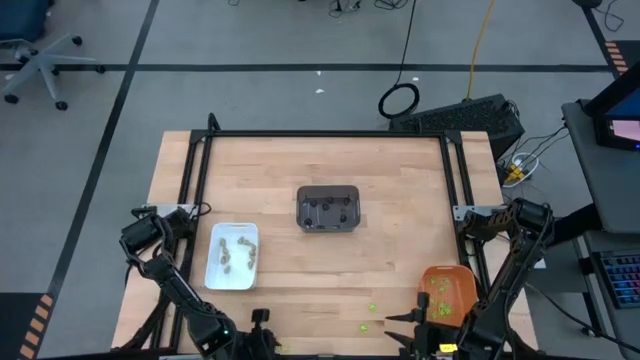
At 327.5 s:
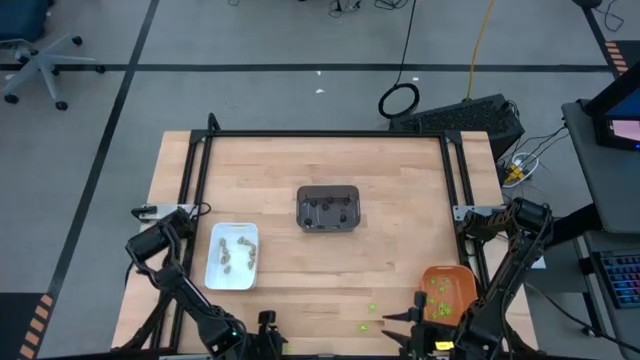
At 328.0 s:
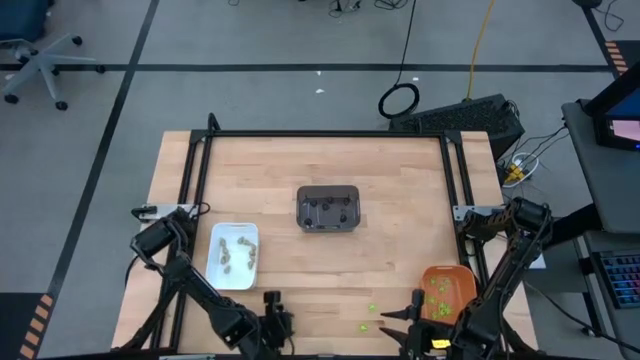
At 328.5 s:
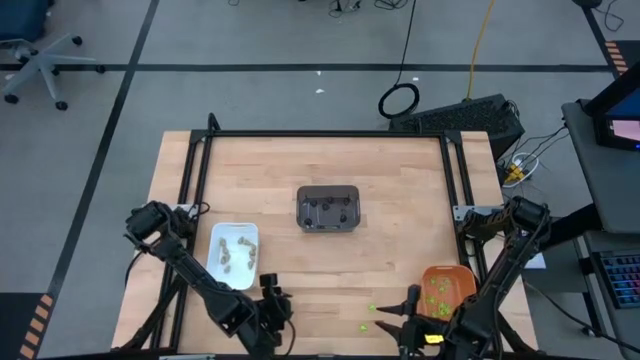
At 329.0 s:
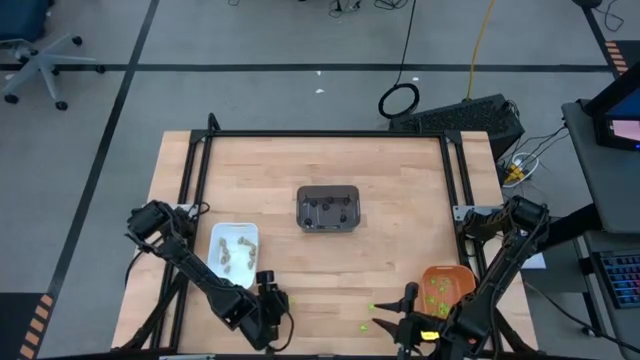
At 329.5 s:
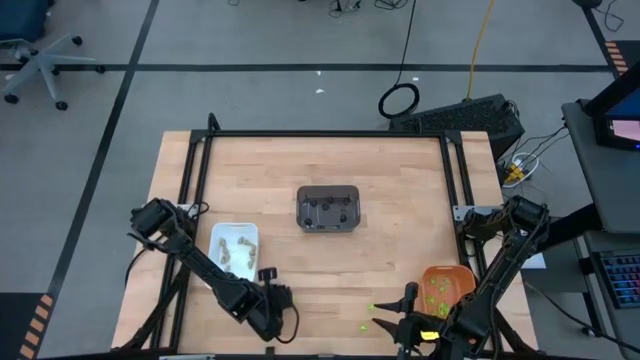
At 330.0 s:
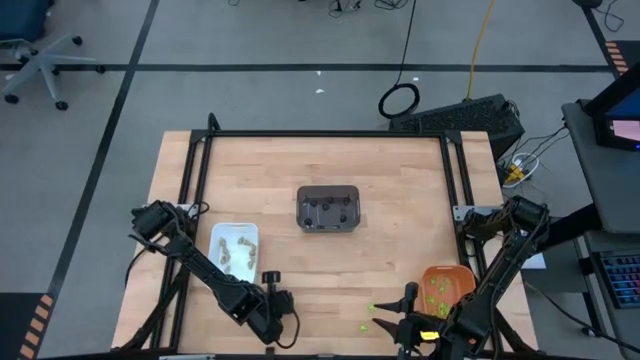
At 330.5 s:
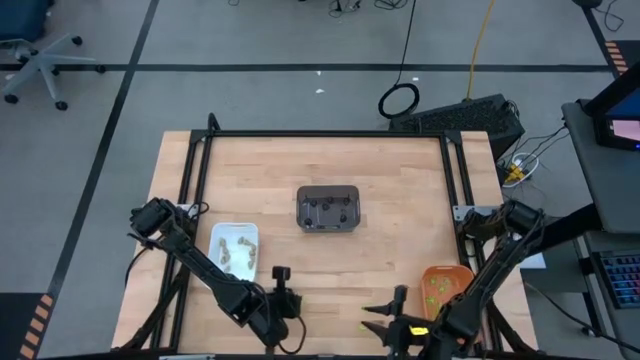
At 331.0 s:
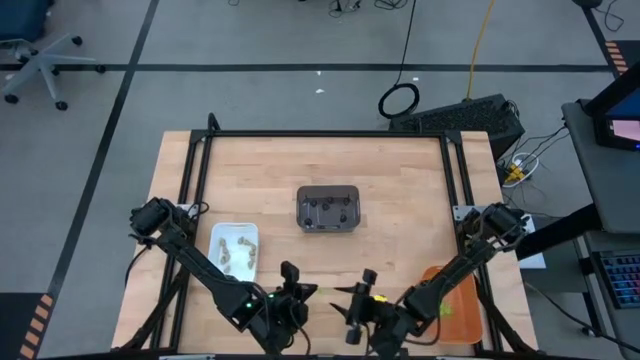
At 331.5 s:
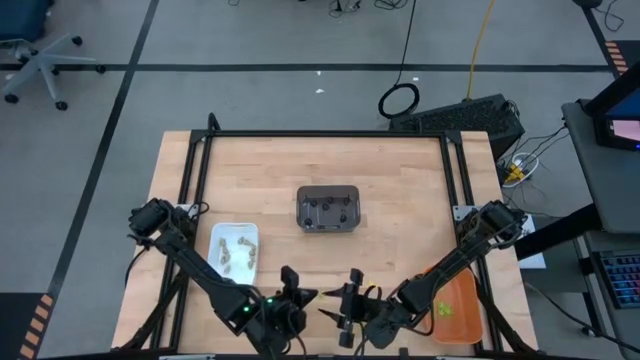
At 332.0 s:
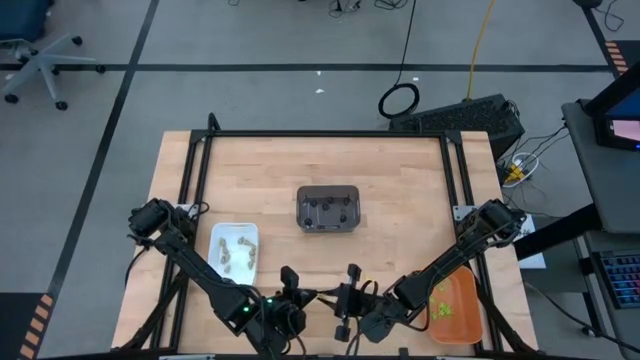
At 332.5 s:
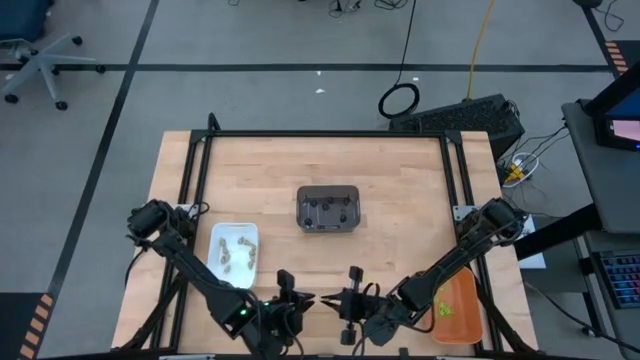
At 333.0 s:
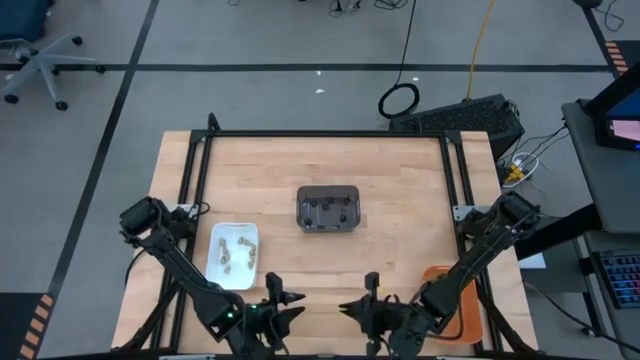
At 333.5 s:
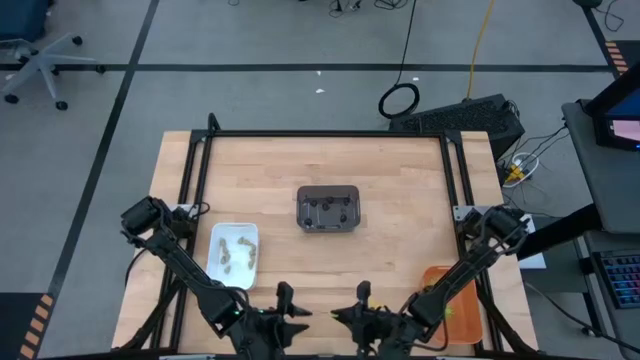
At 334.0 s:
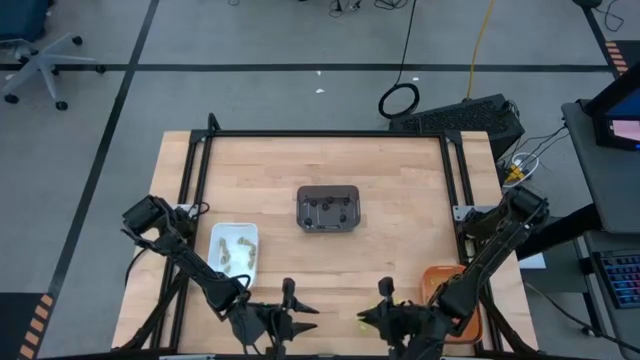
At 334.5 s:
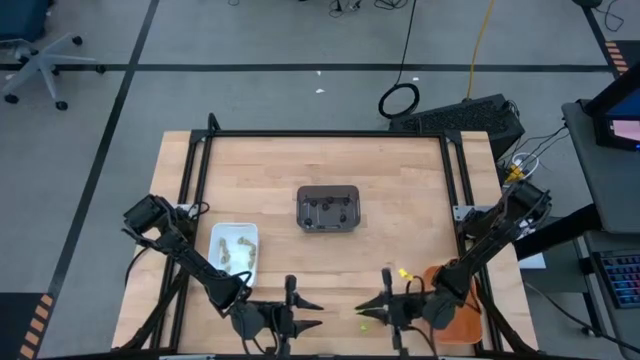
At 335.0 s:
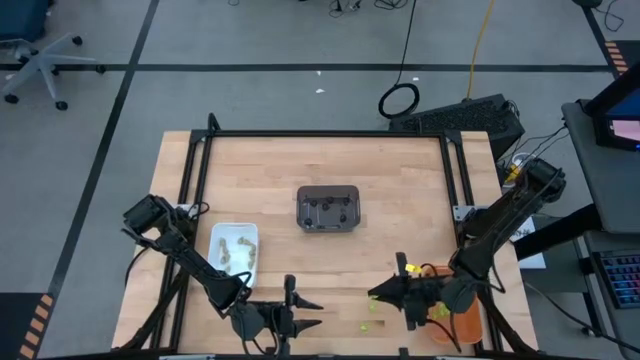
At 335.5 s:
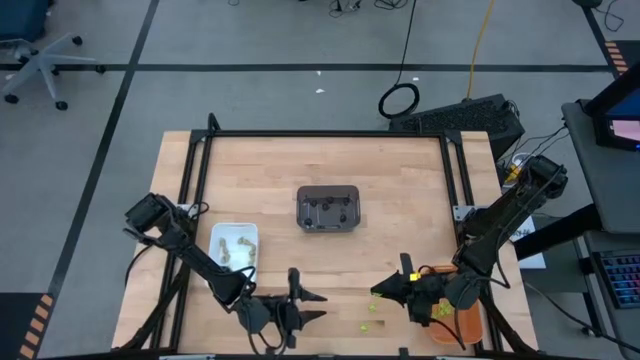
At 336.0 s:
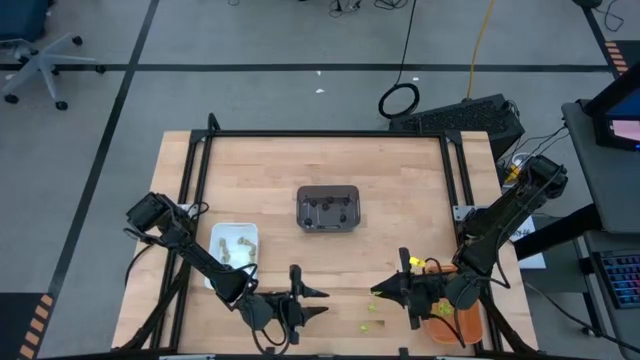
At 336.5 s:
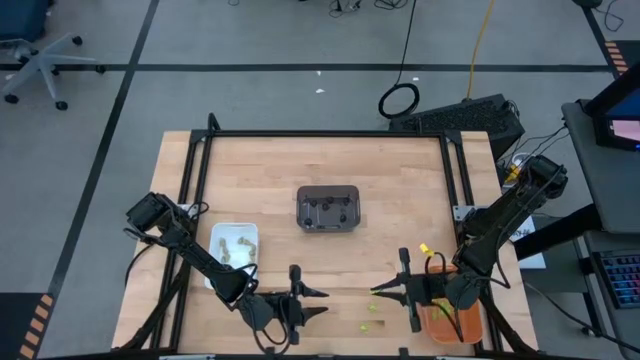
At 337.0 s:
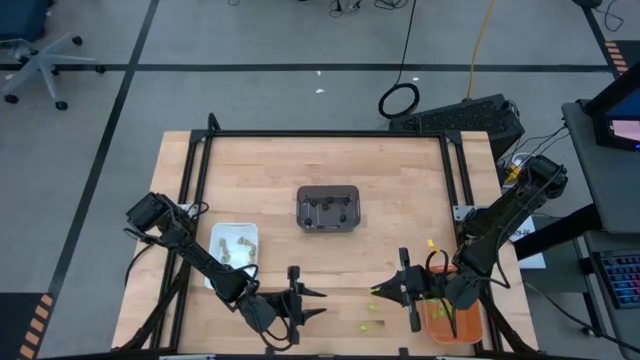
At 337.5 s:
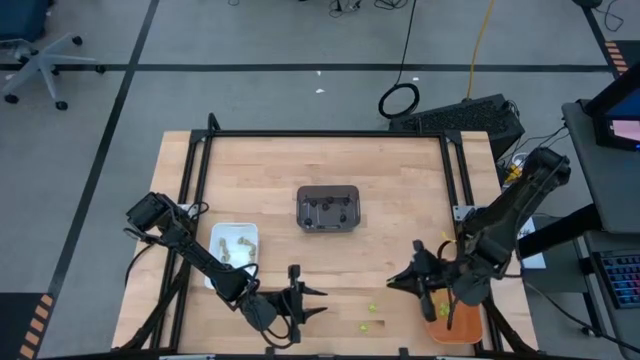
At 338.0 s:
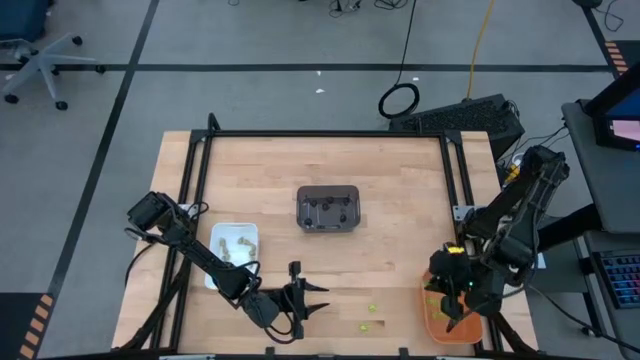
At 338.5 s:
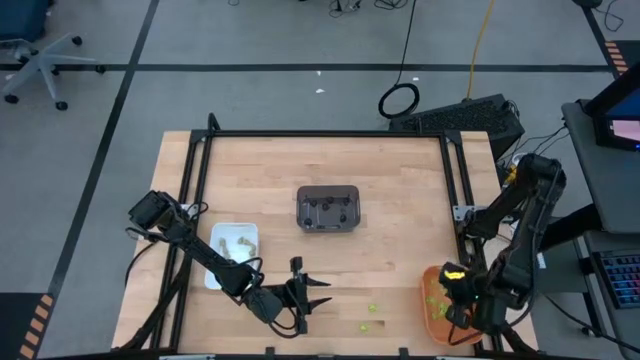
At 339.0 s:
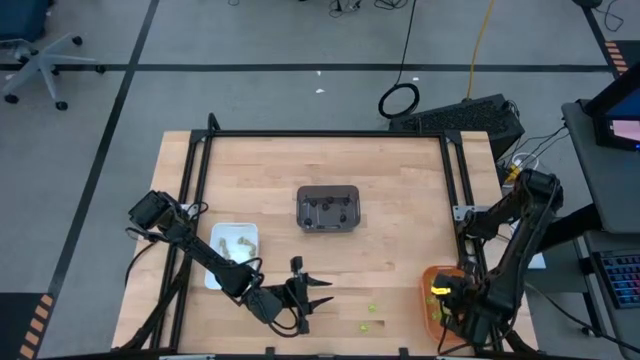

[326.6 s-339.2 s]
Task: Sort Halloween decoration
Put the green spider toy into the orange bin

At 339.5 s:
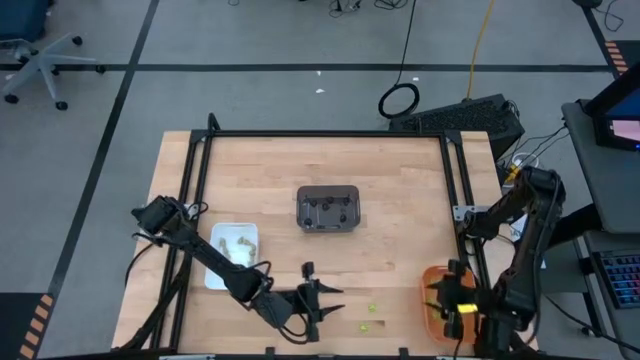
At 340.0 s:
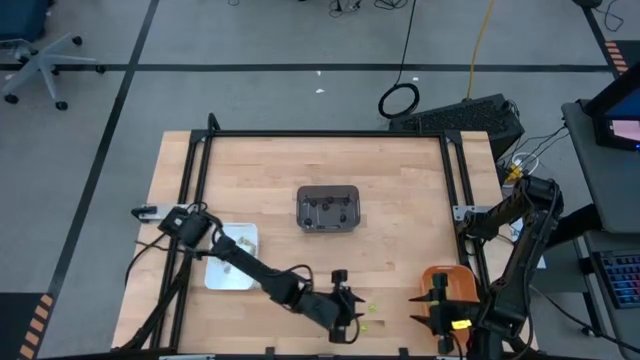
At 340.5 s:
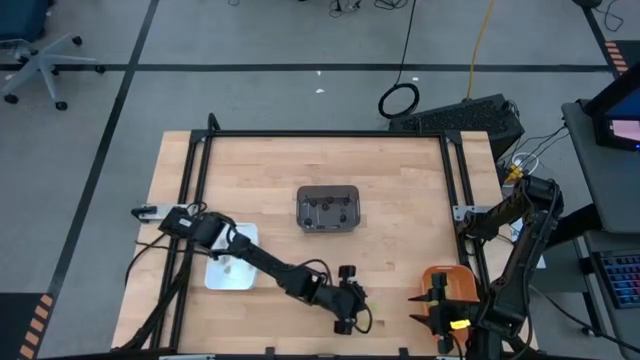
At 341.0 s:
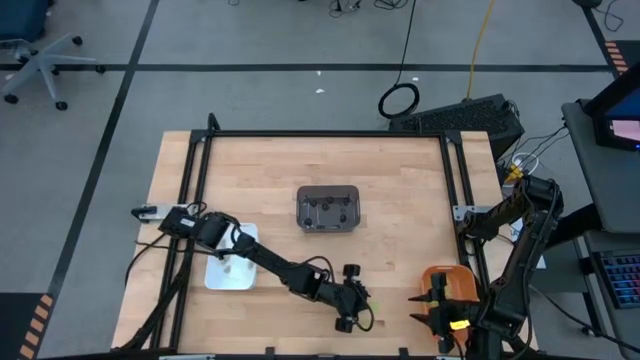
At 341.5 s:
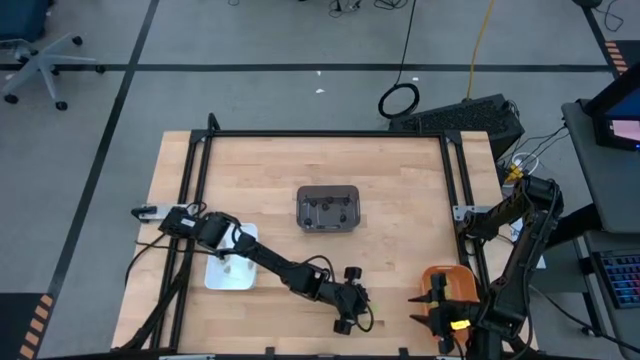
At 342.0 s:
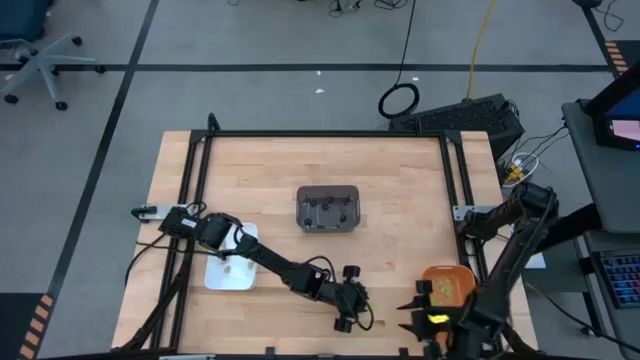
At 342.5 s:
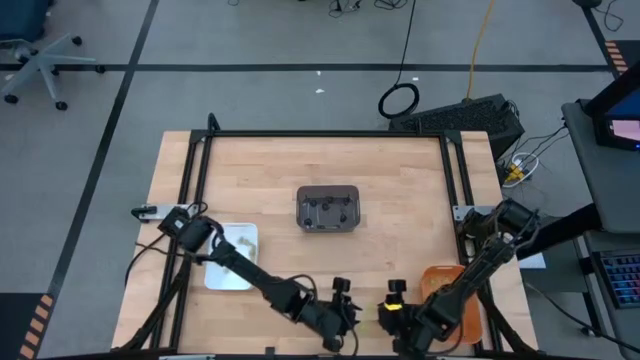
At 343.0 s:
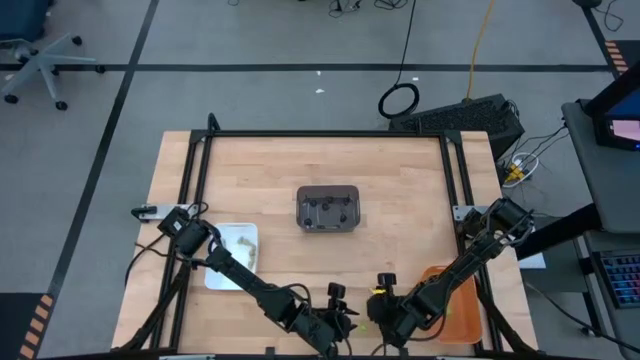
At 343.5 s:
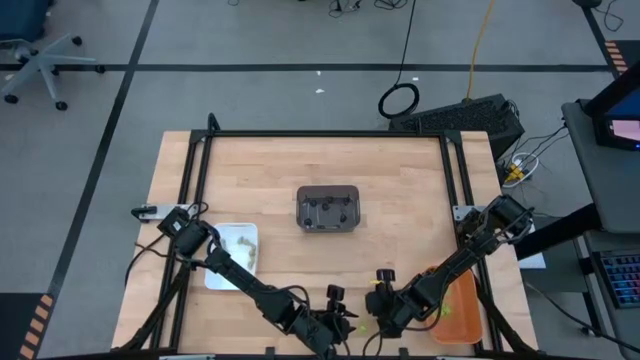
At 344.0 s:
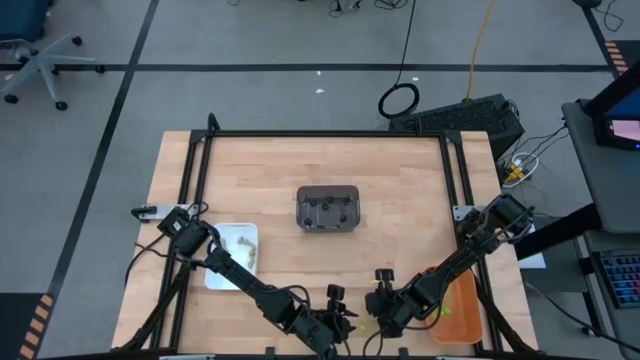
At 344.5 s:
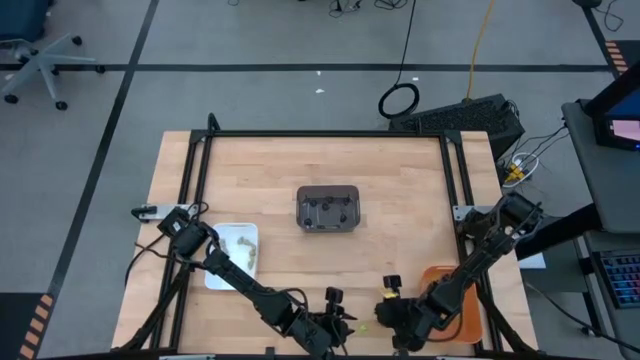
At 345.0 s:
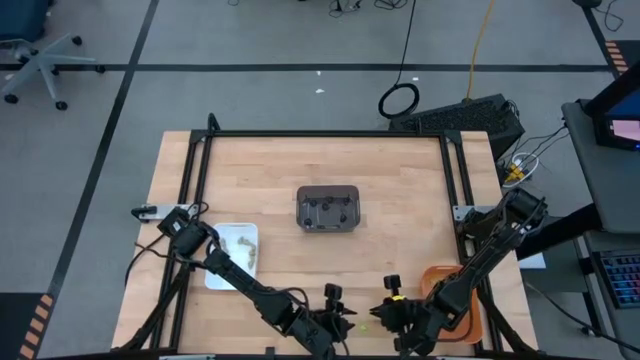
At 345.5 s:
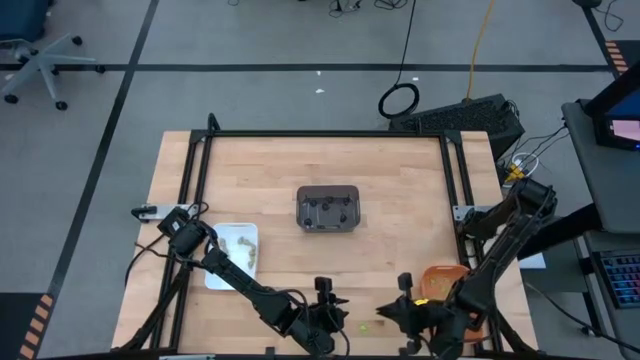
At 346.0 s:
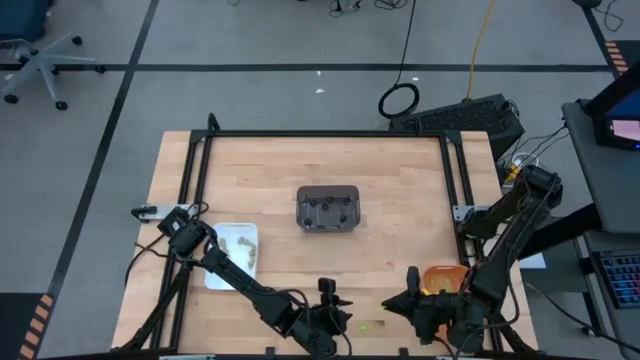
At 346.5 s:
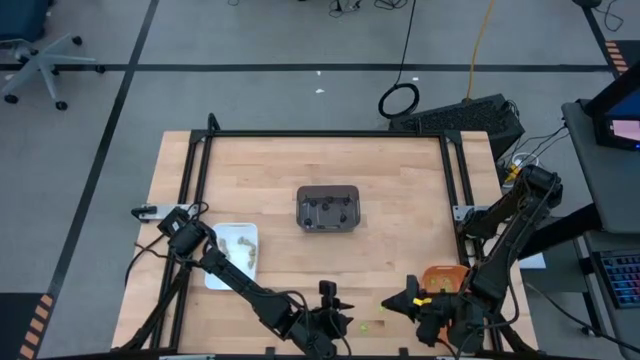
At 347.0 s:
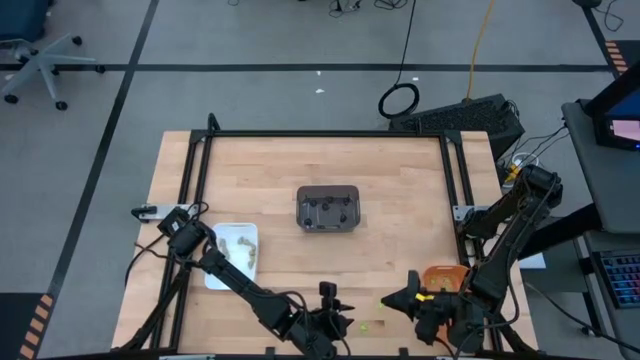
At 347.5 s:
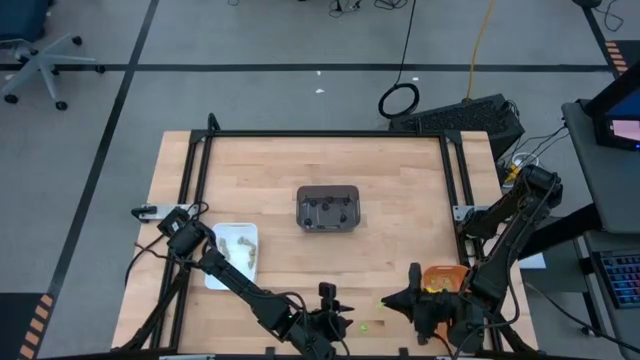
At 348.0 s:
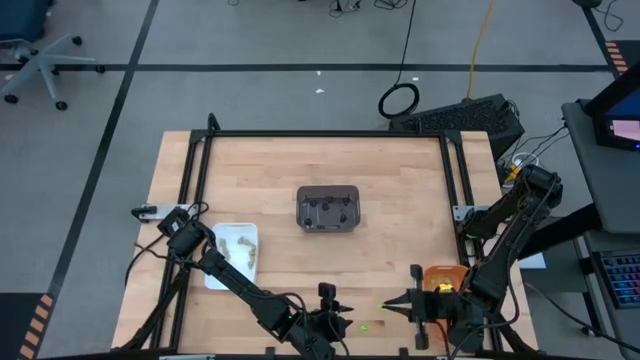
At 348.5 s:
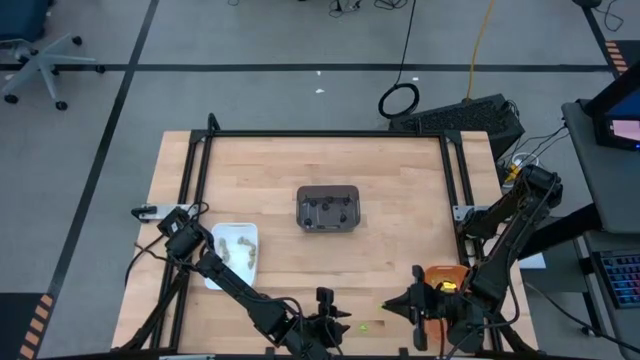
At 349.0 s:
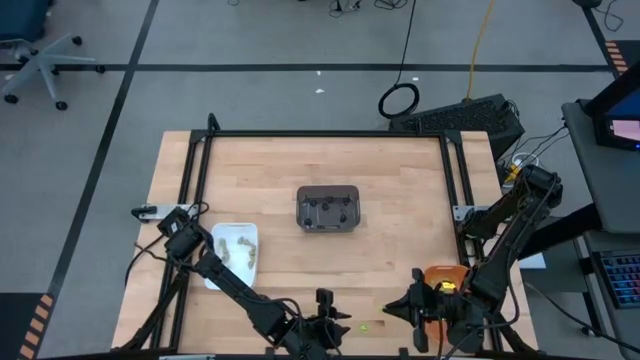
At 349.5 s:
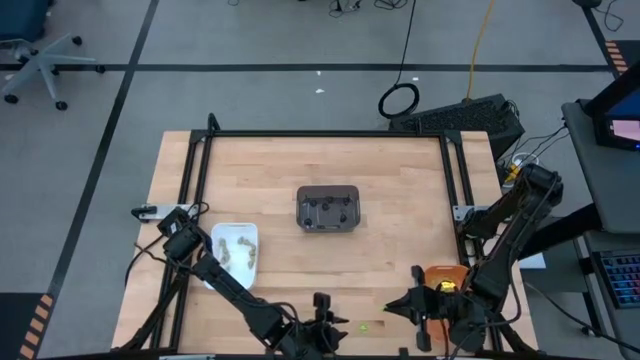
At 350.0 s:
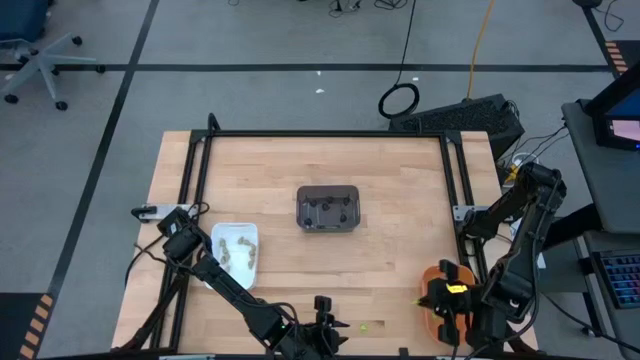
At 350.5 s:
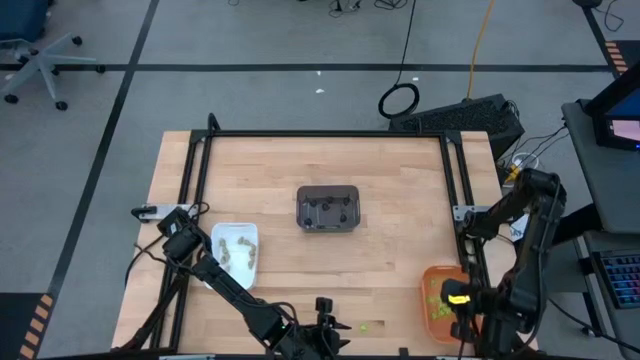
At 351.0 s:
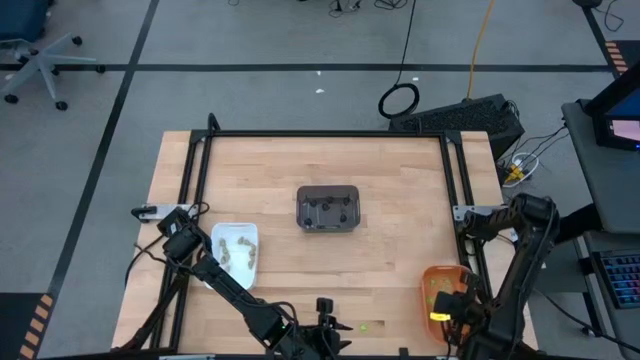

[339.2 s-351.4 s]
Put the green spider toy into the orange bin
